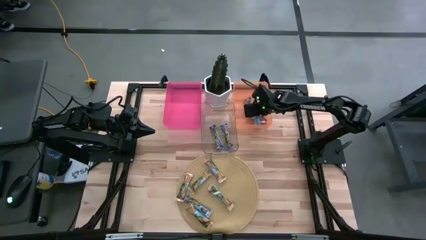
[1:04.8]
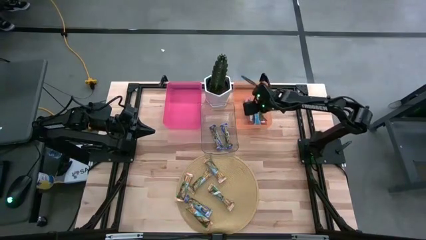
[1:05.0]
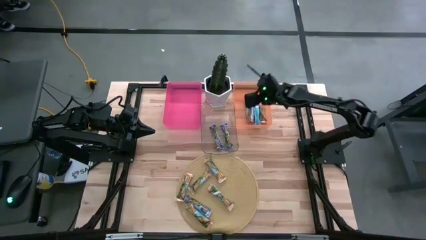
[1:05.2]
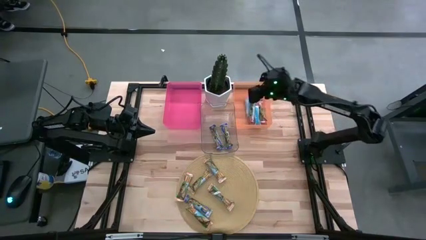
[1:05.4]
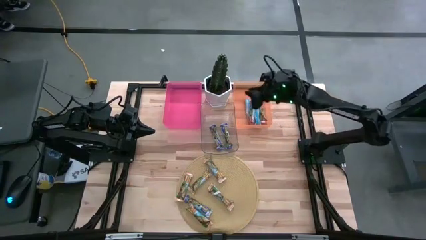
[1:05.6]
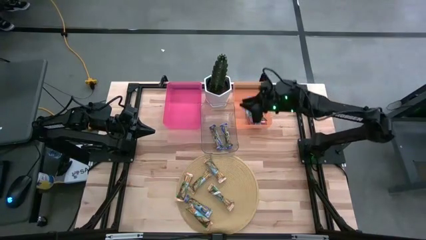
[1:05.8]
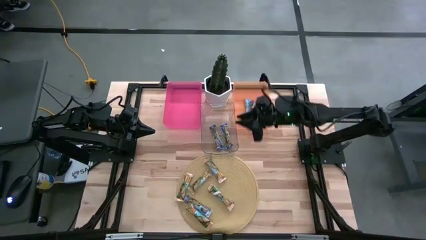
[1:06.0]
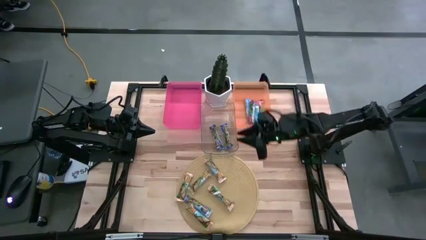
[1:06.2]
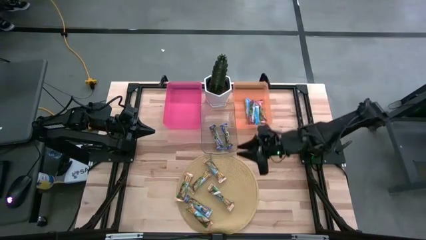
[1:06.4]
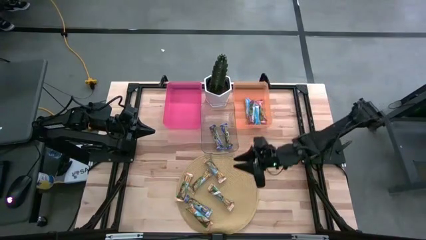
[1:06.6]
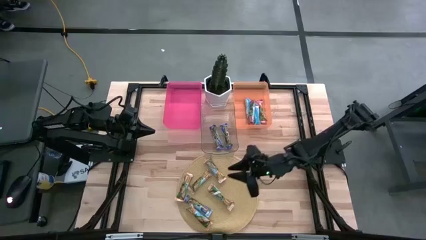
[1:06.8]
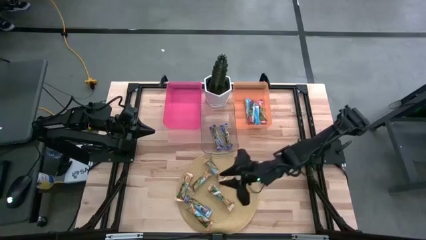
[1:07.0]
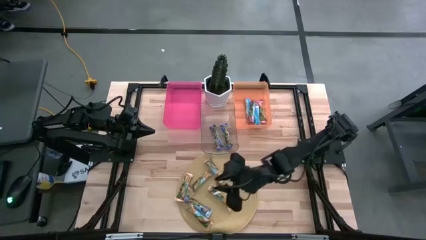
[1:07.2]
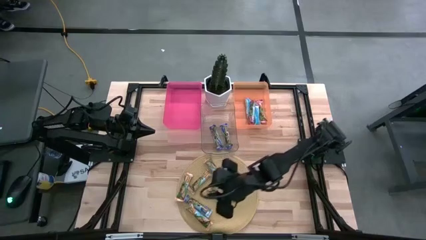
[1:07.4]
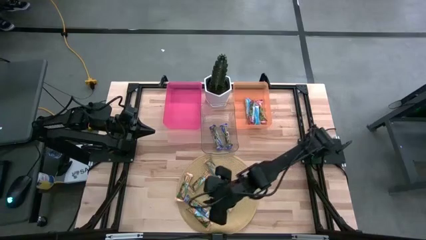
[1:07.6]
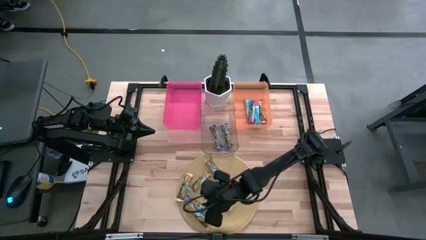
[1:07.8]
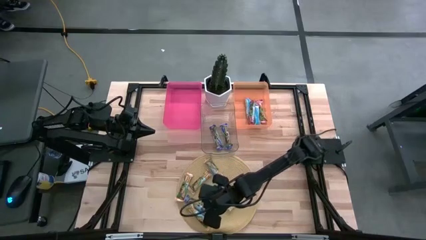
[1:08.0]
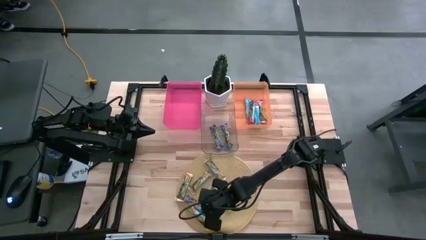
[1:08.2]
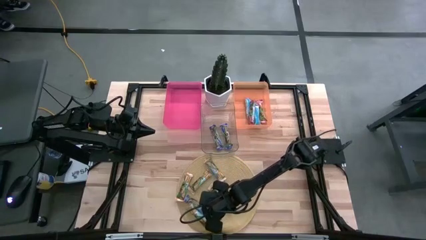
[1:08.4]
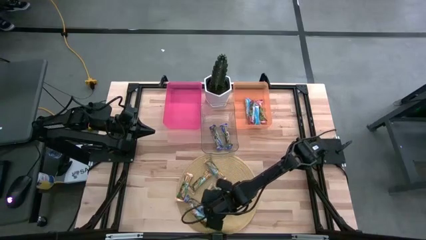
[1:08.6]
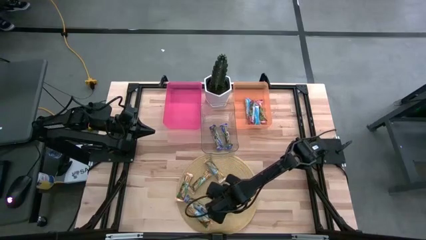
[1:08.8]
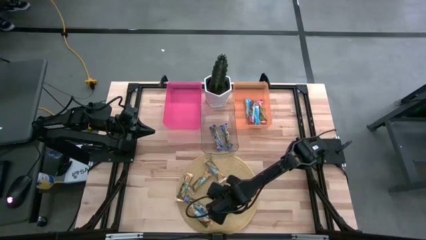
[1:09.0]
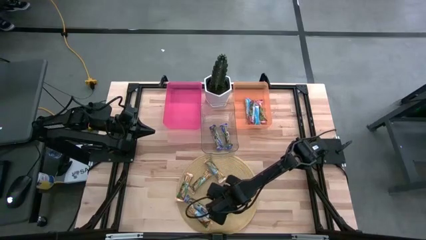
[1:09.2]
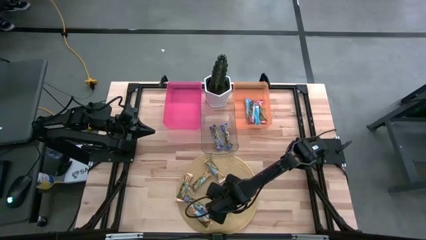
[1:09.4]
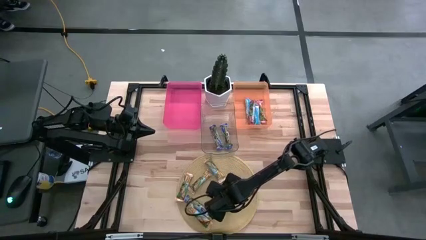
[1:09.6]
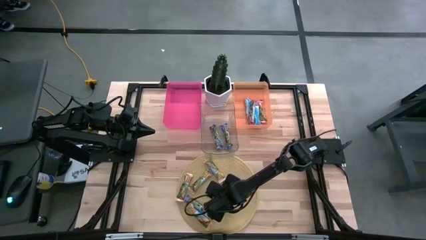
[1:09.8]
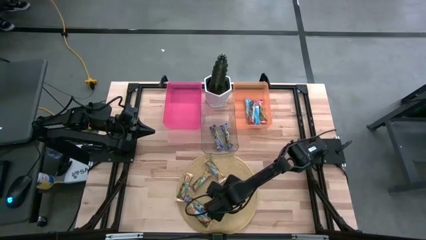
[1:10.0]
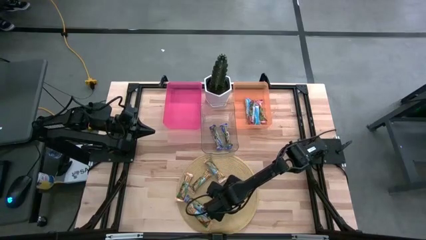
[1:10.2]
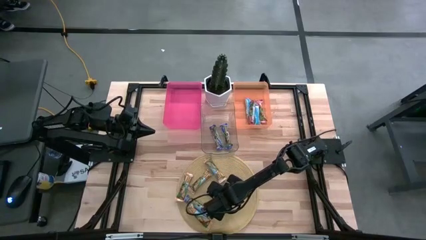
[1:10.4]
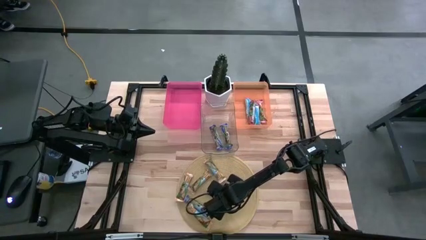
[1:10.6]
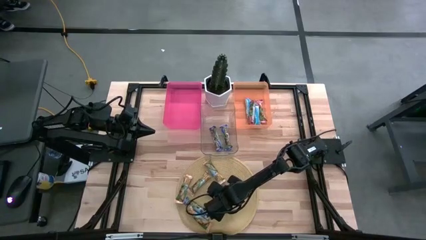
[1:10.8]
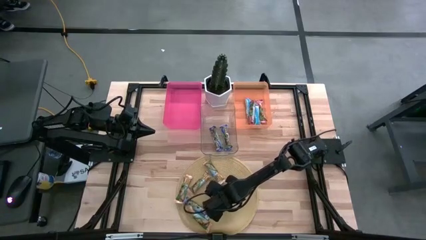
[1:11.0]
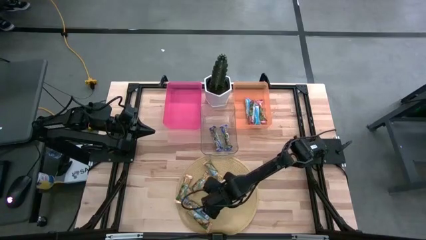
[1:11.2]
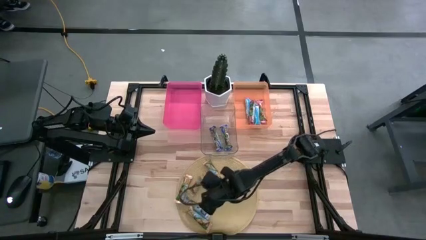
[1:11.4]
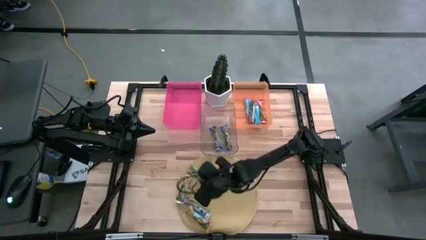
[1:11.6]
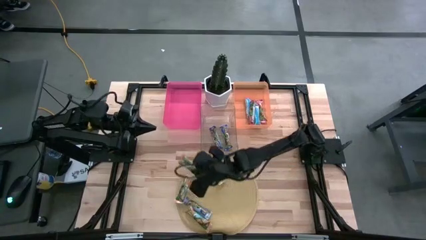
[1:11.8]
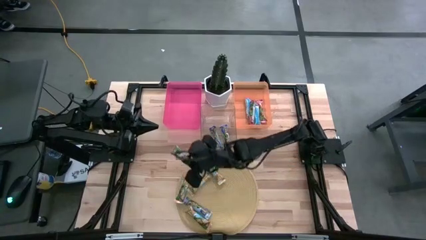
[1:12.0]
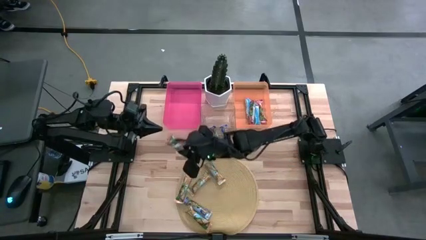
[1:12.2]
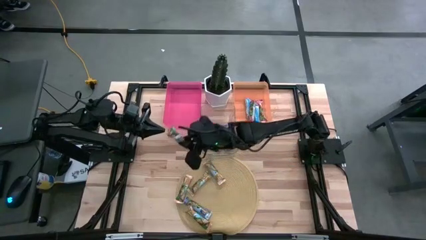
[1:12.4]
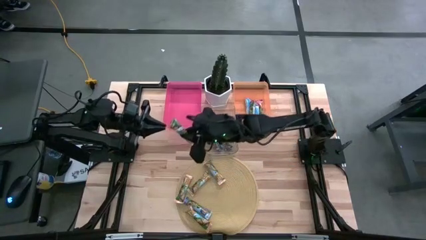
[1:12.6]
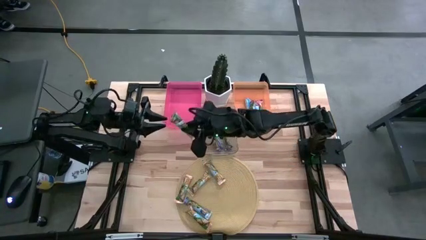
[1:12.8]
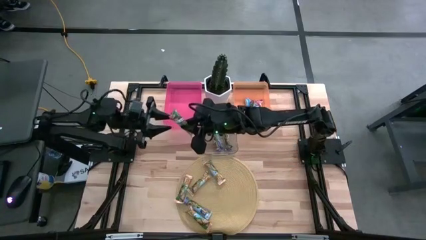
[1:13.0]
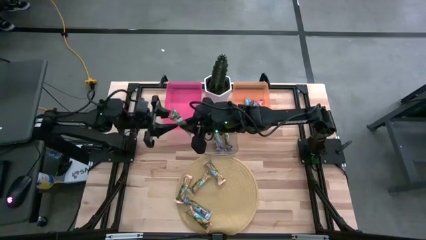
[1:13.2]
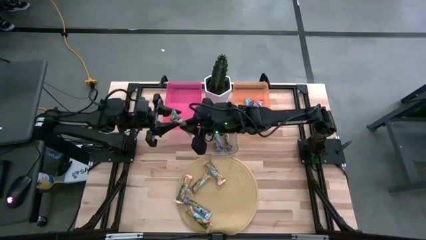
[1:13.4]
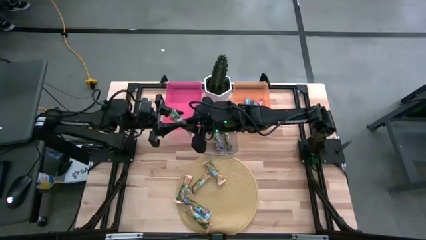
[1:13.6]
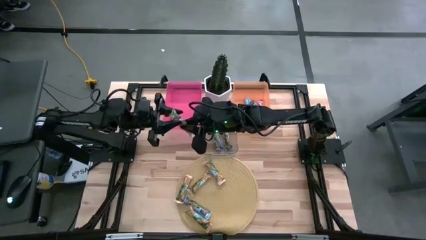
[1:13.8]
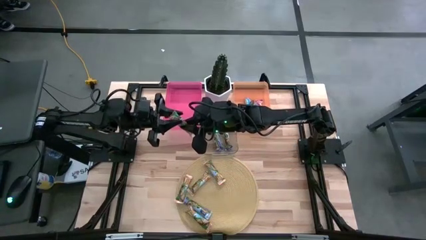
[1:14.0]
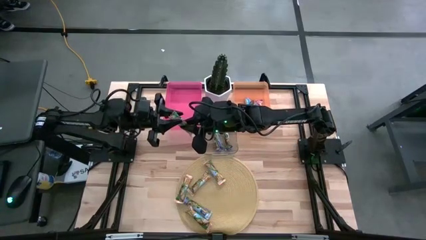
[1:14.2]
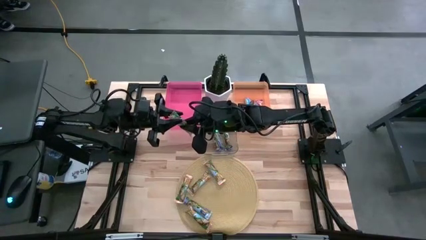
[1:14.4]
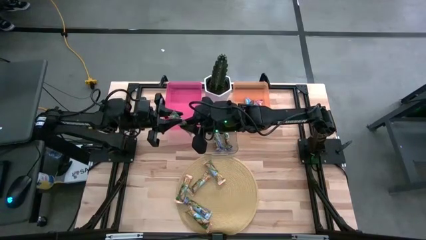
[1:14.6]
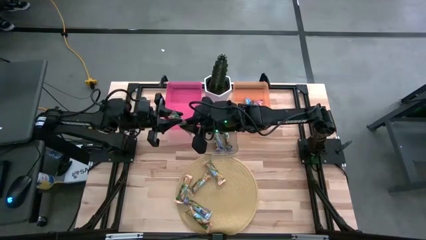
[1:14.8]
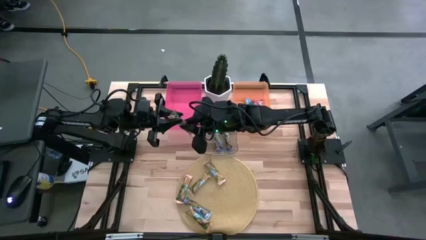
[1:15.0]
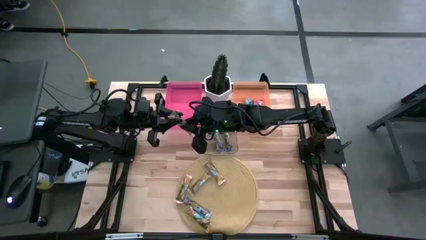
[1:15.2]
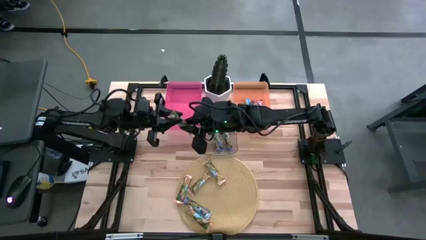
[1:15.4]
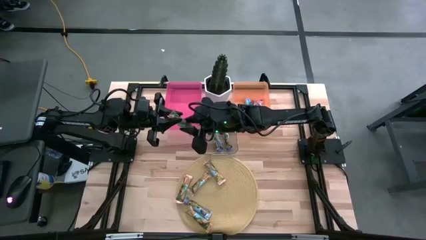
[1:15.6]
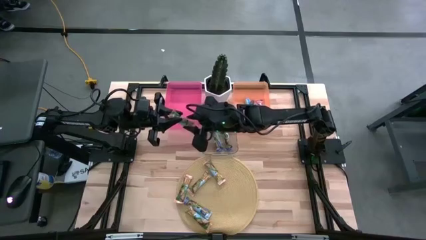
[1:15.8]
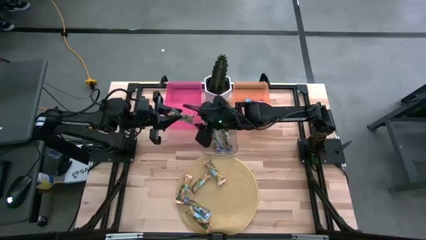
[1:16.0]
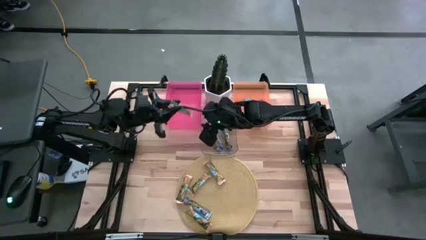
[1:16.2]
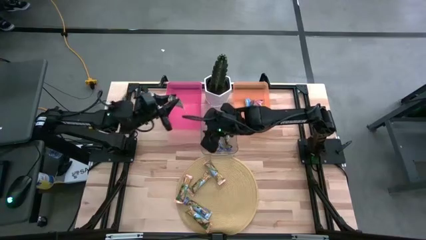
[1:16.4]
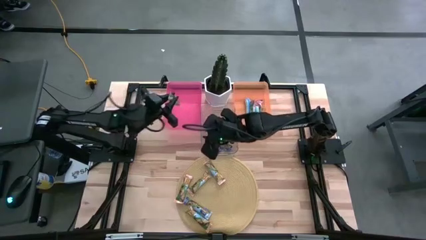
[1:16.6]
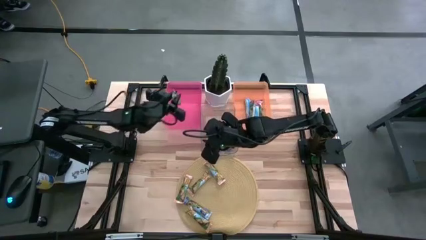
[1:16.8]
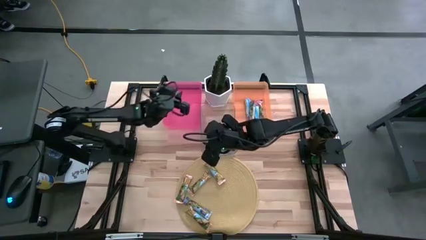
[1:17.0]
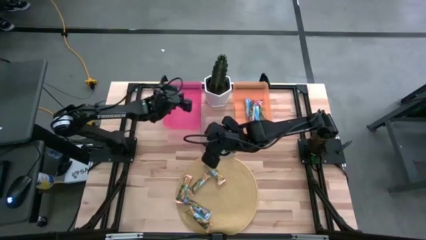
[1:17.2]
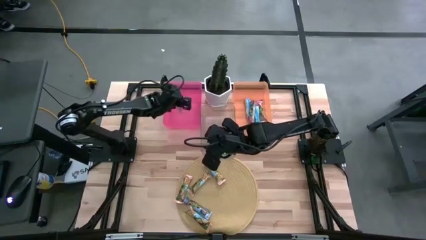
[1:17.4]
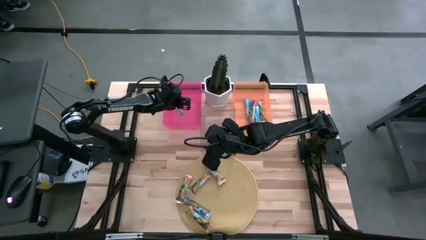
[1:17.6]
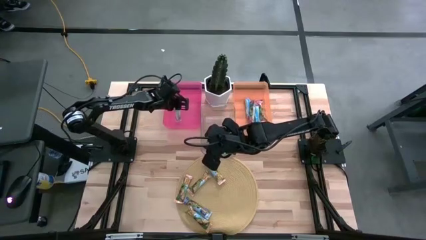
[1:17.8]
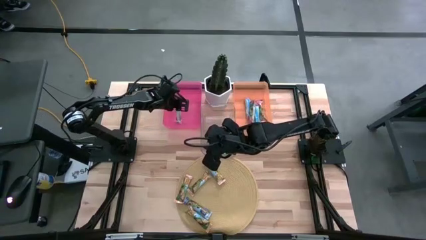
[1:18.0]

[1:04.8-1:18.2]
Task: Pick and place Granola Bars by type
Put the yellow granola bar into the pink bin

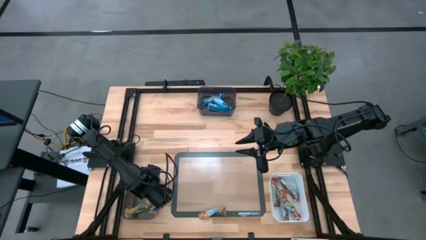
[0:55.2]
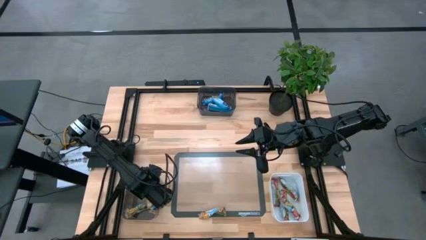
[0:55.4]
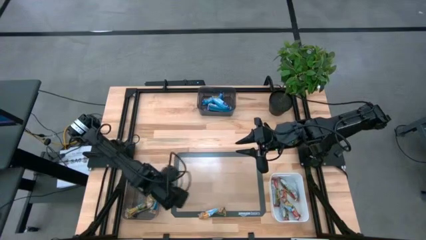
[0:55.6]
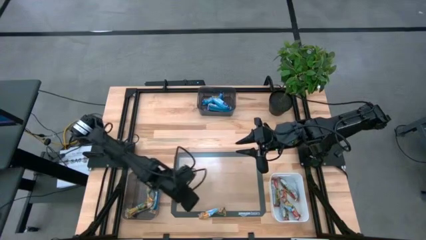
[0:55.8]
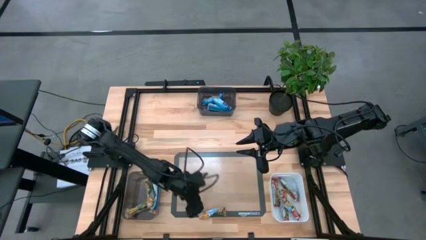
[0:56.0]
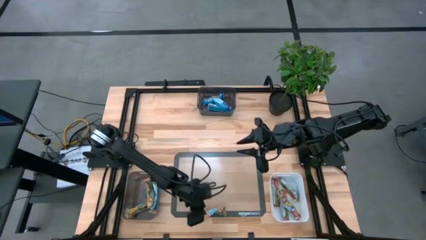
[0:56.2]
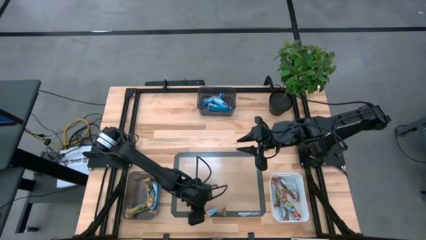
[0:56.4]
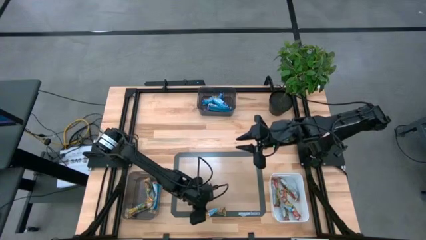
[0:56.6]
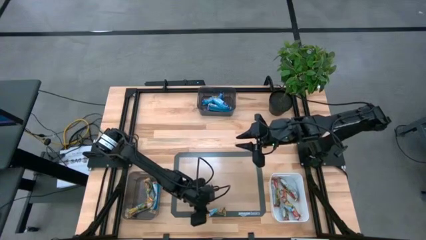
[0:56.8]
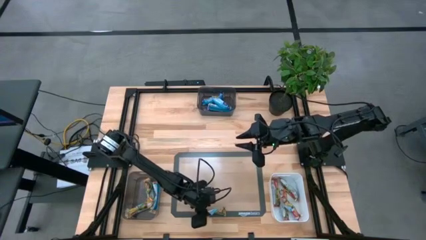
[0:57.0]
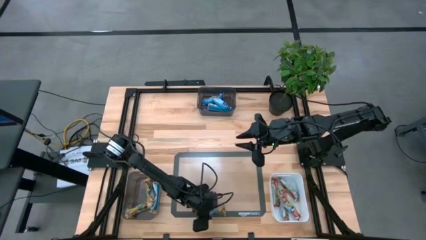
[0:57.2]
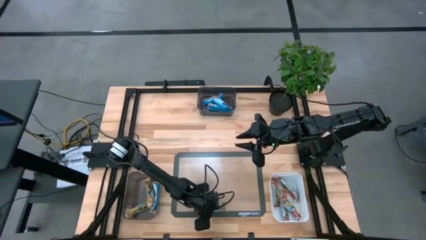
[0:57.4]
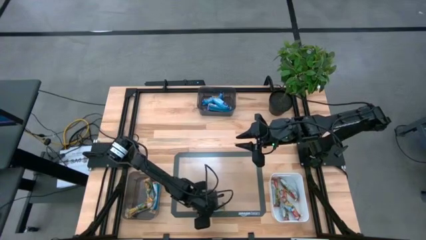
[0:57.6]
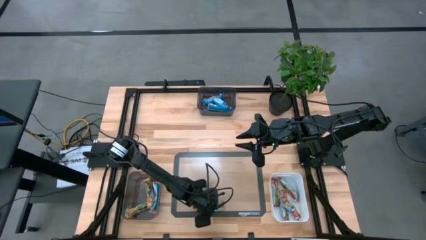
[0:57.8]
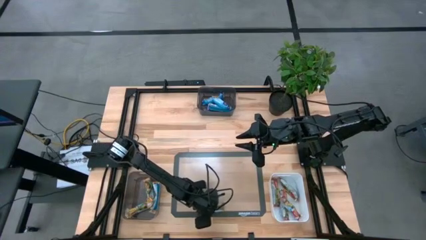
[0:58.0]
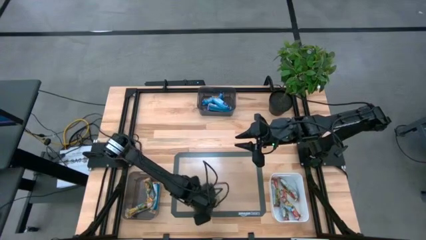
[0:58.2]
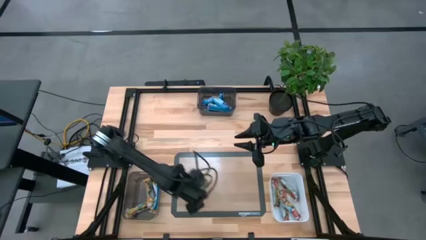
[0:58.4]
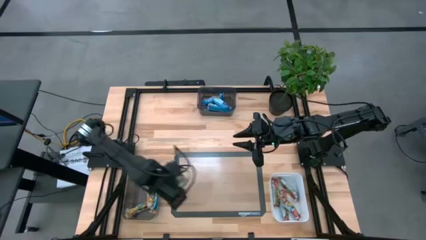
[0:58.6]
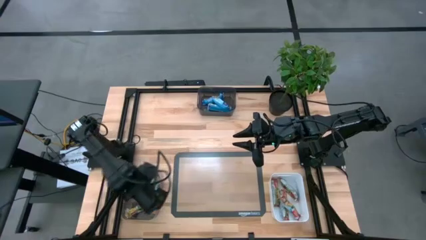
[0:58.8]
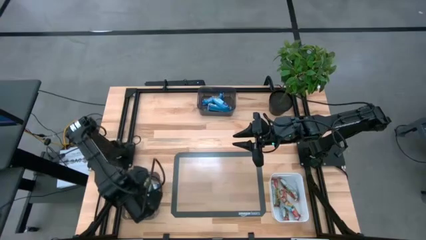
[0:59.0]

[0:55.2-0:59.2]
Task: Pick and place Granola Bars by type
Put the orange granola bar into the bottom black bin
